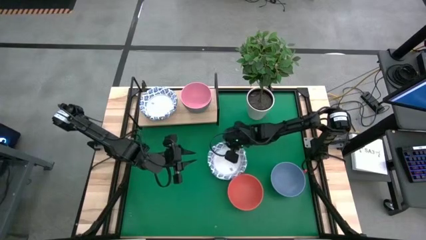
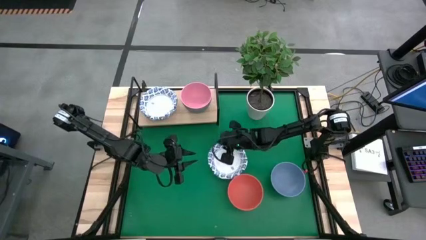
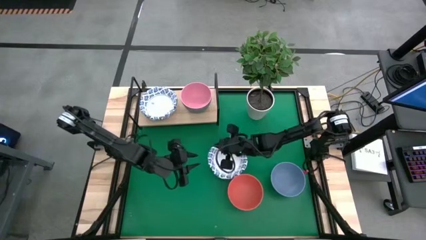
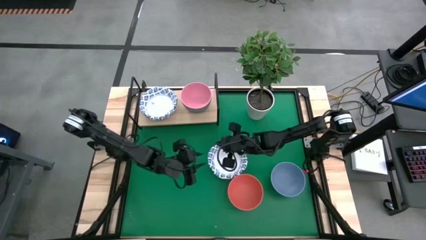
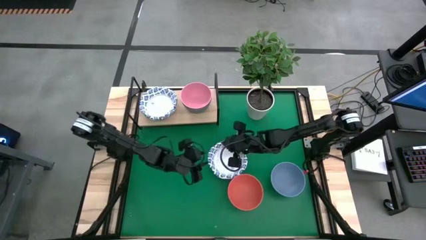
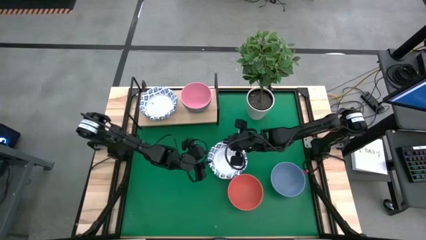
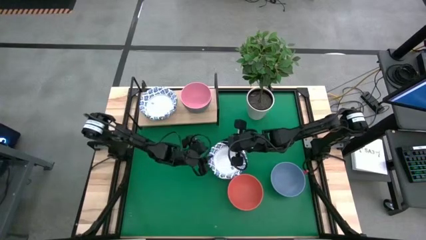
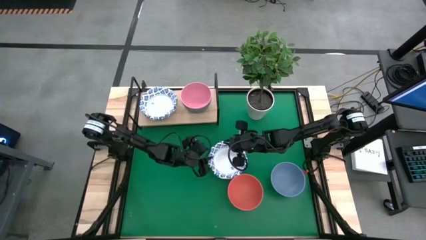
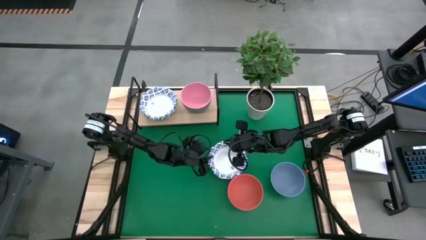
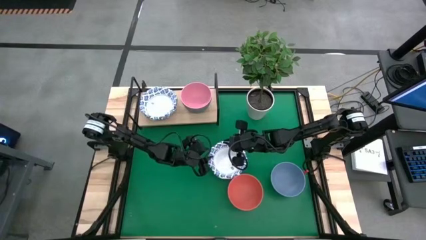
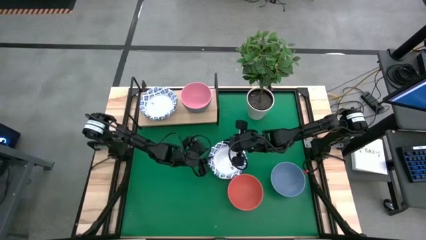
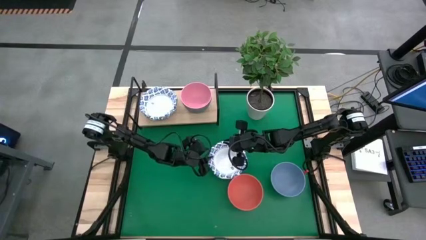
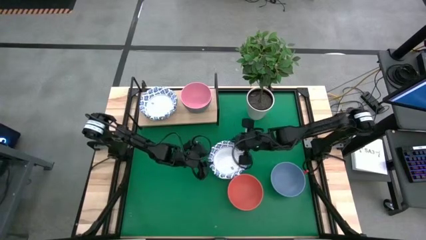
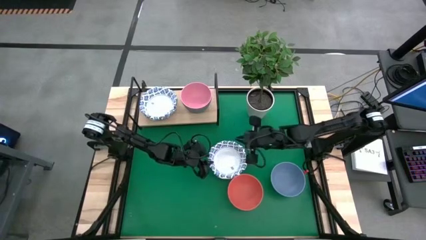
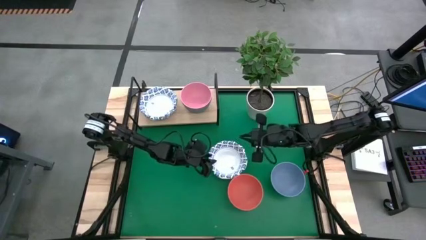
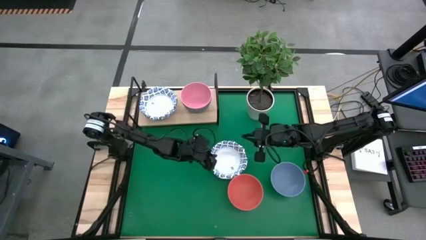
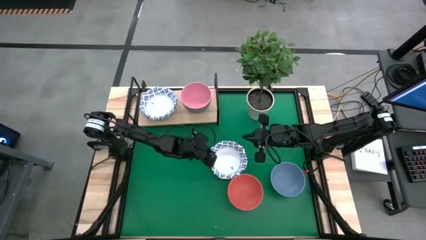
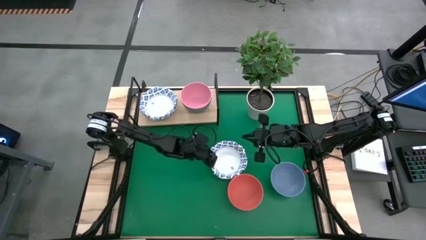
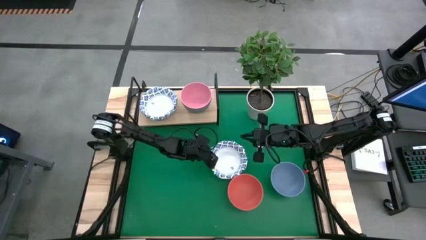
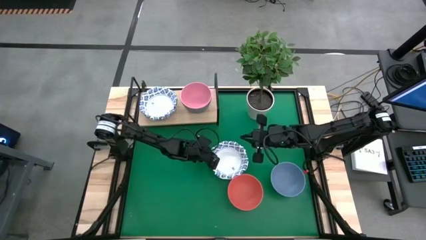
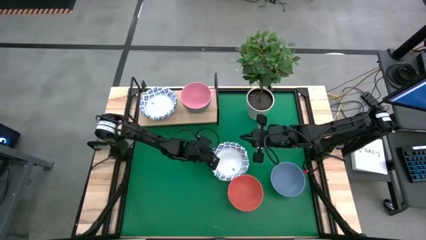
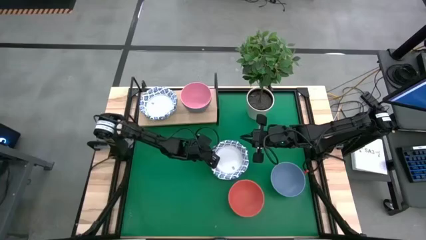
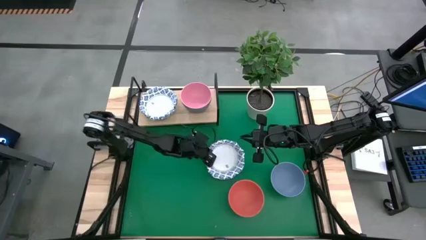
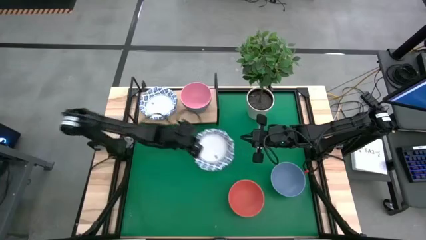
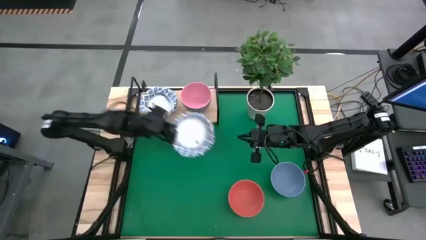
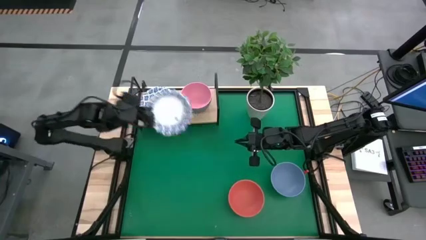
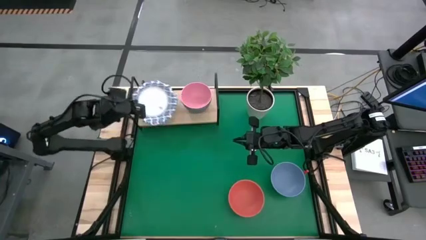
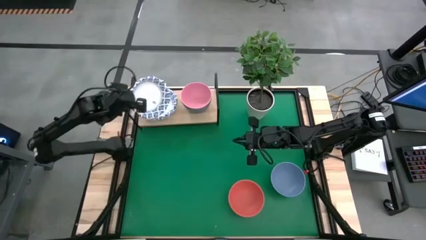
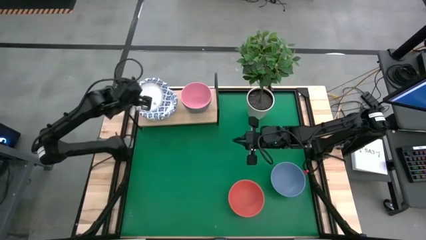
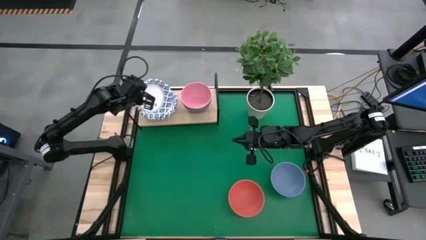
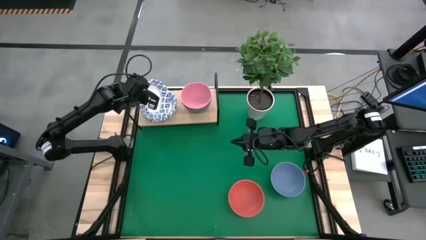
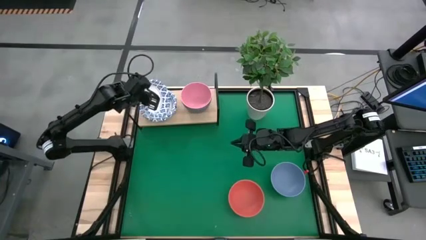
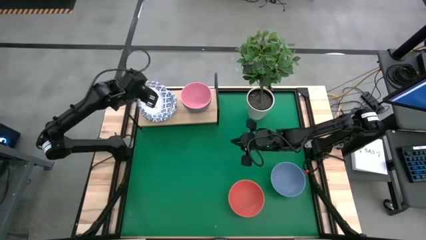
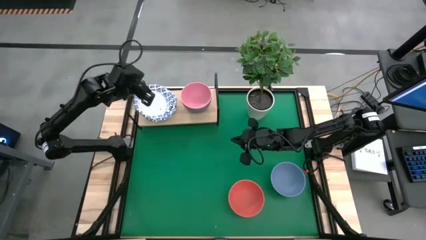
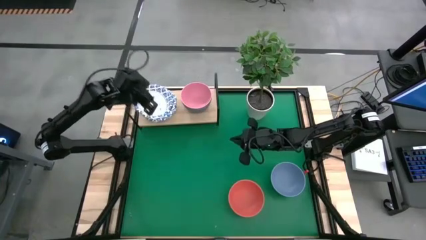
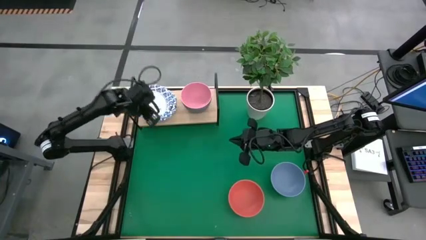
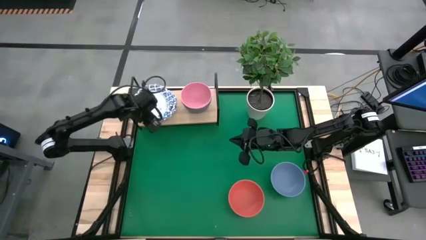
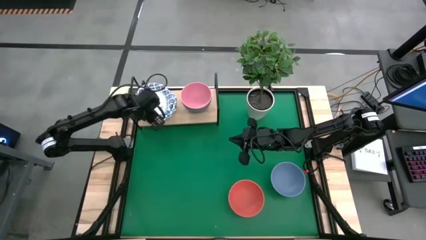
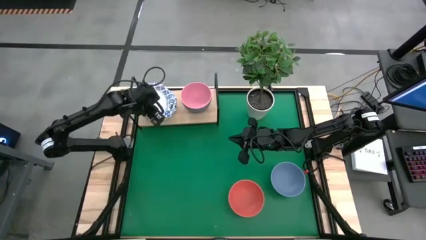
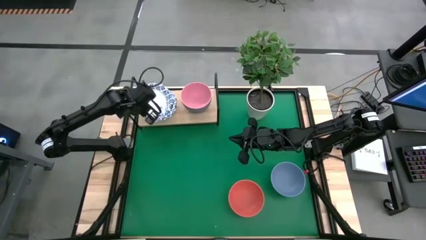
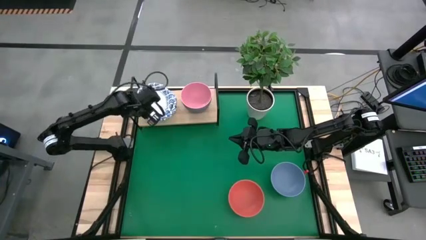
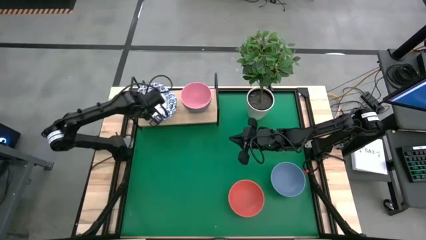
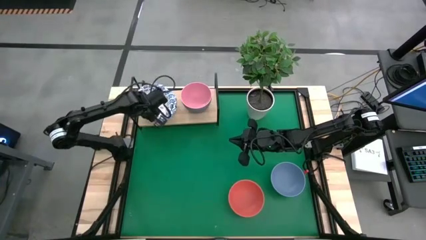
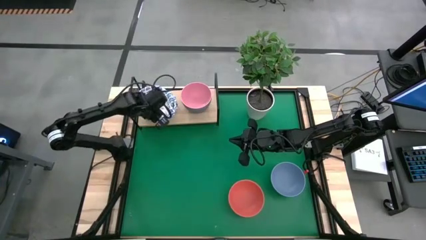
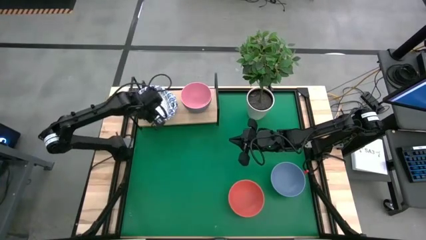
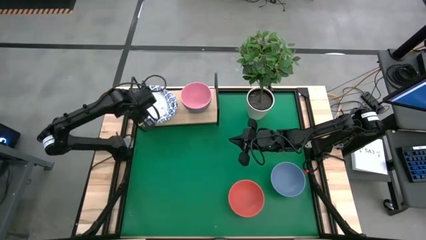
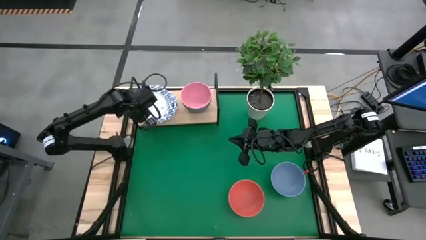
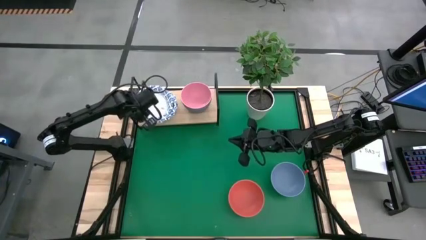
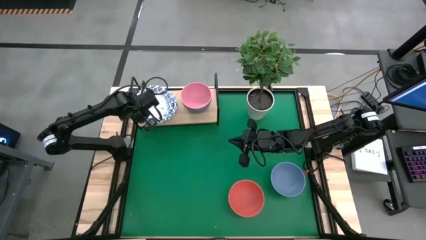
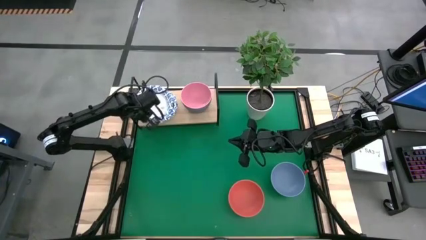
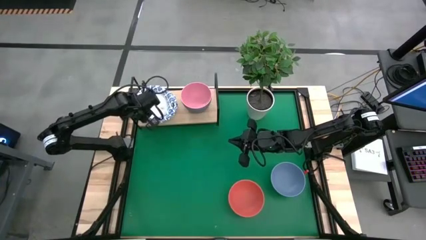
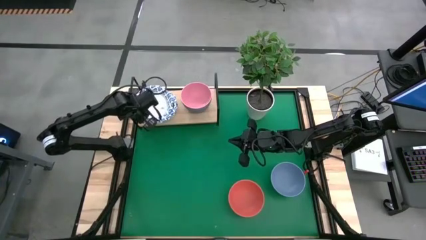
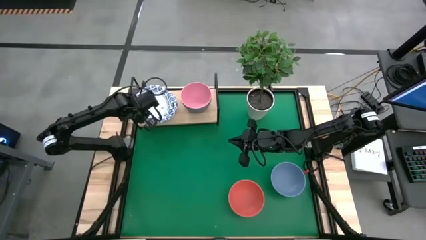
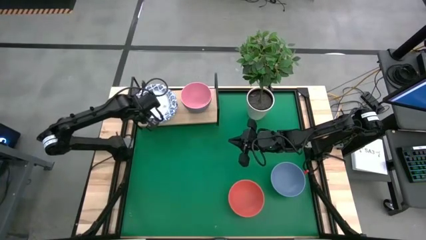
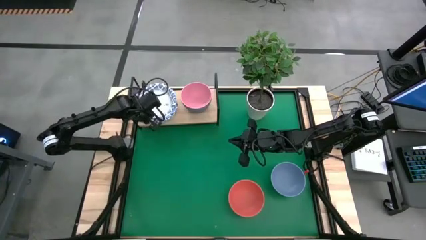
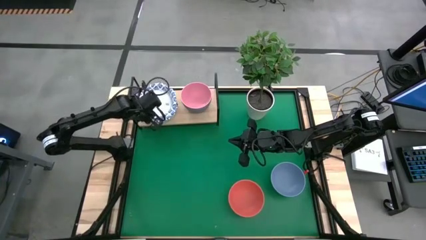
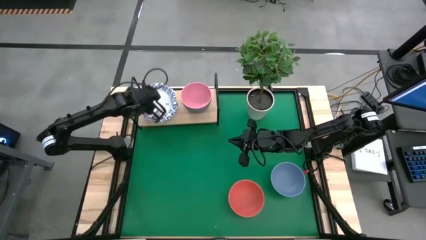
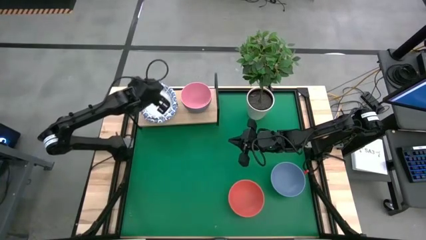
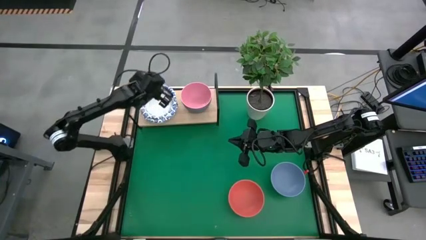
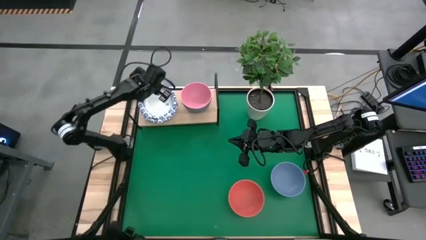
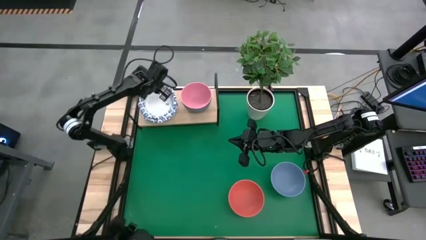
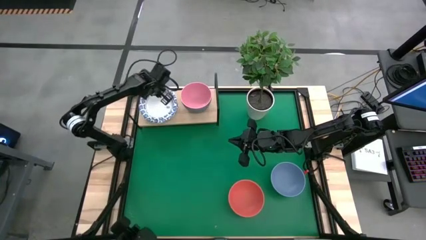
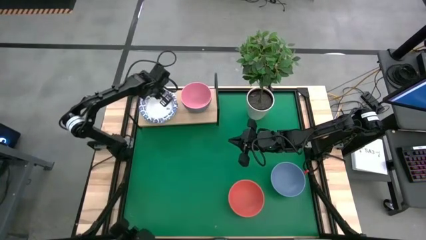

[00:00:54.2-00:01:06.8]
Task: Place and stack bowls onto a shelf
Stack the white and blue bowl on top of the white and blue bowl

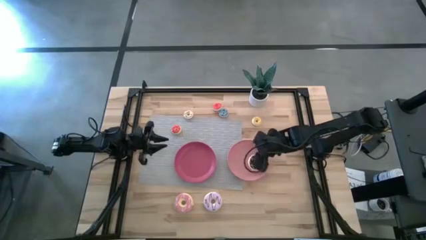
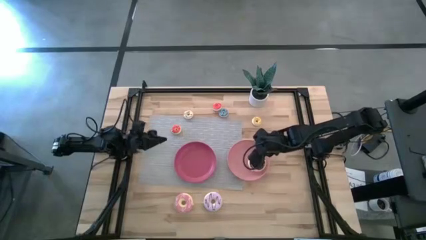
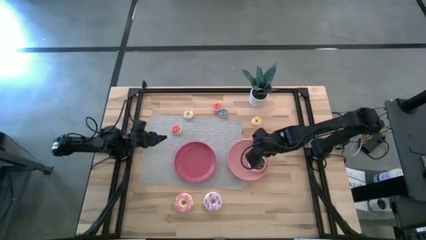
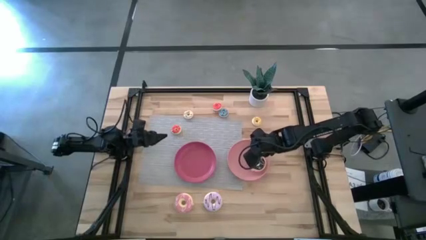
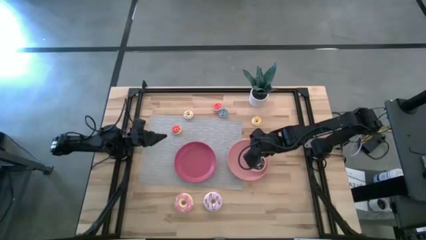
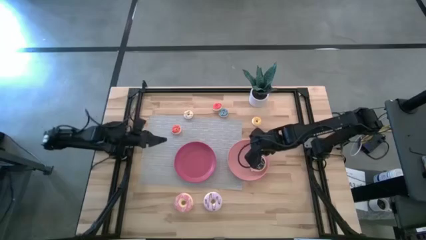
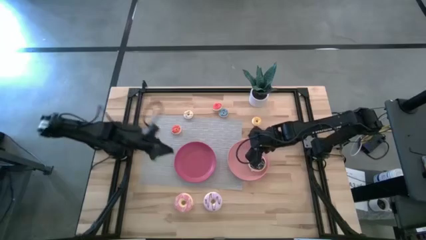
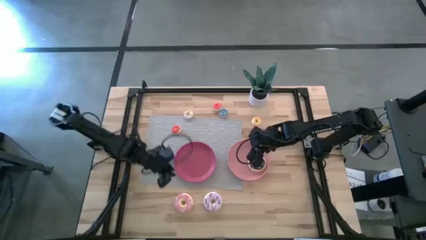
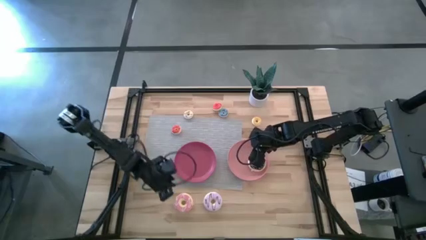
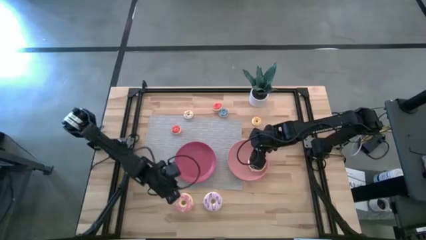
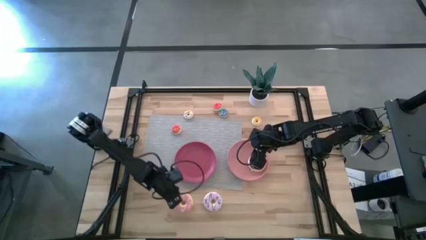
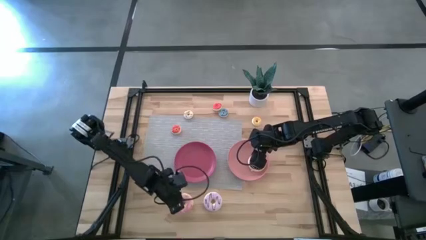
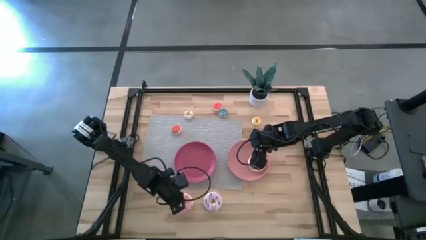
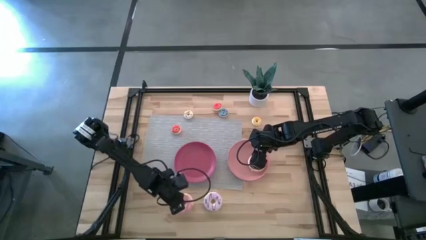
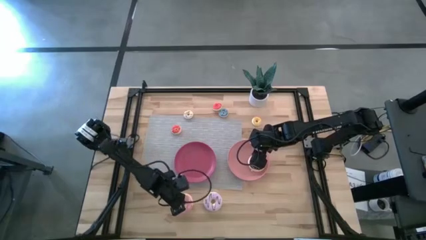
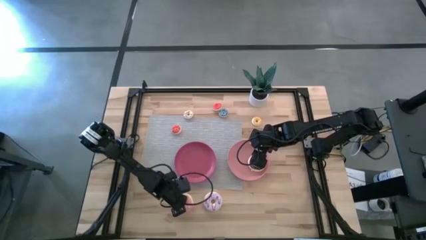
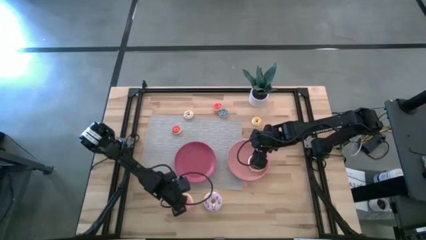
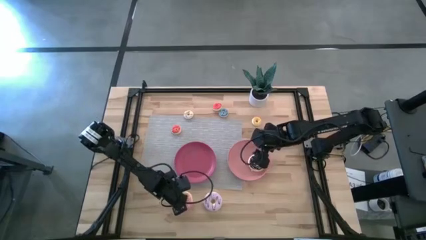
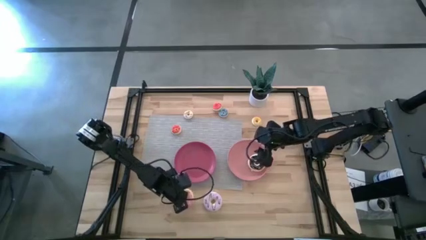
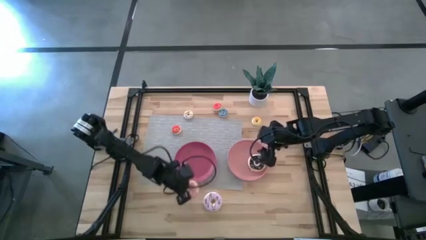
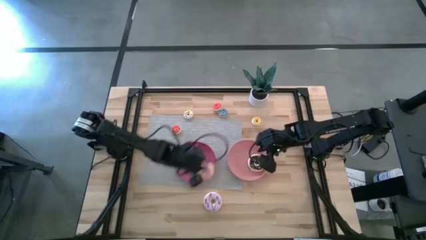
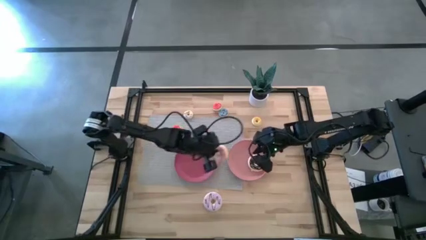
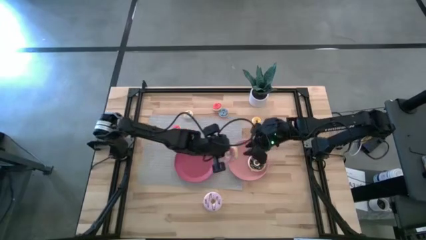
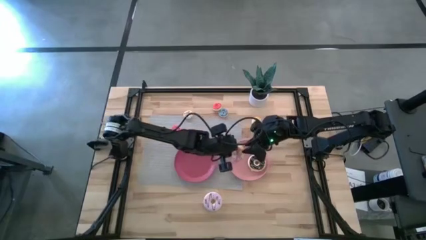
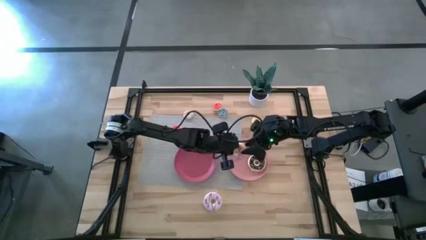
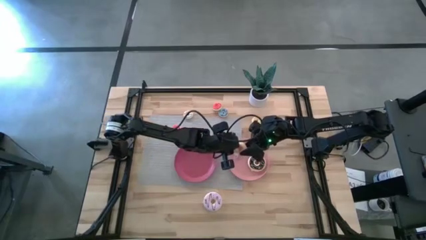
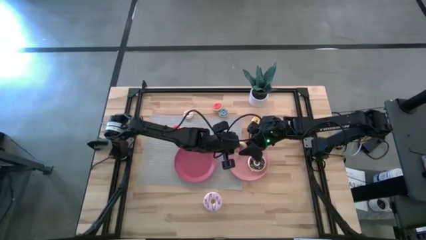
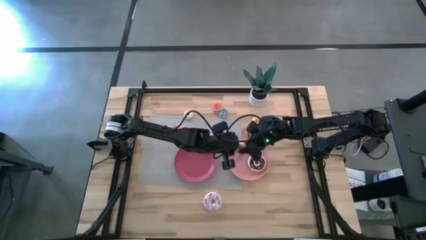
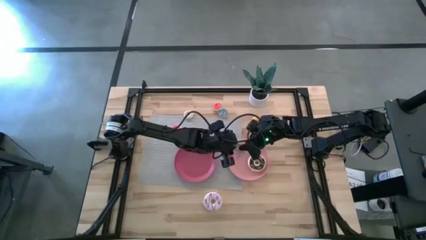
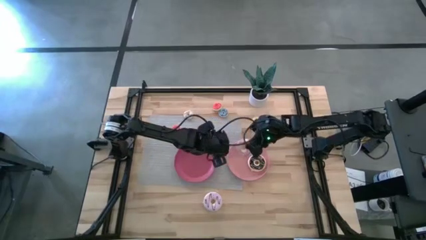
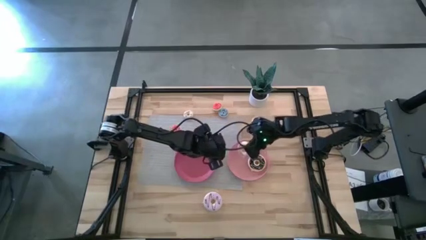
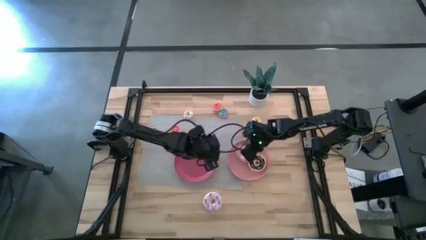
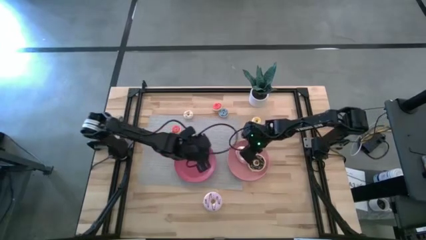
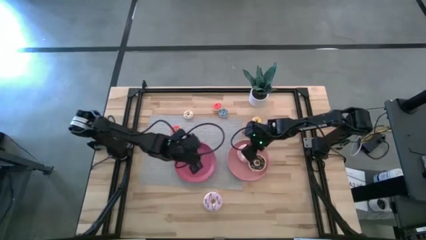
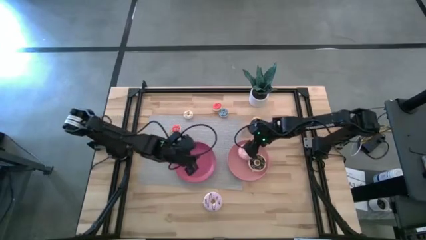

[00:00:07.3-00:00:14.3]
Task: Pick & Place donuts
Put the large pink donut on the light pink plate
